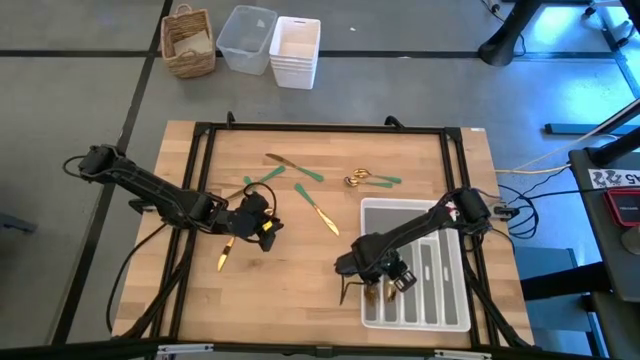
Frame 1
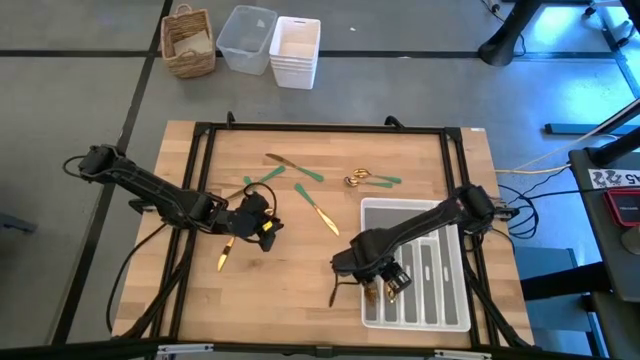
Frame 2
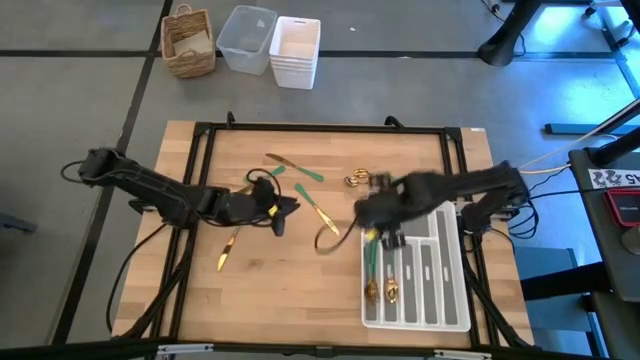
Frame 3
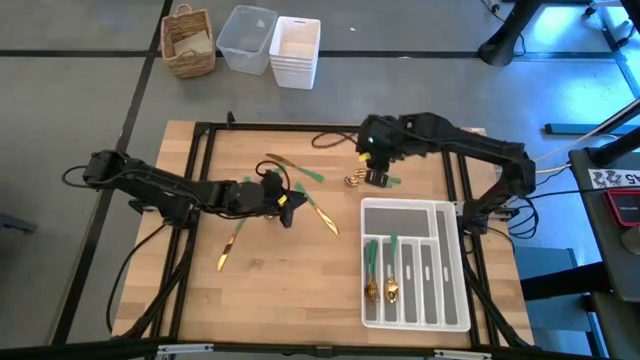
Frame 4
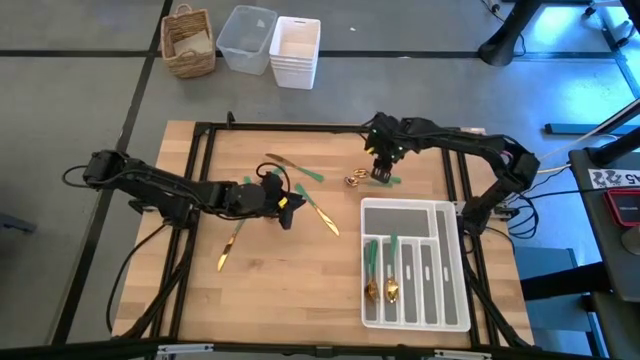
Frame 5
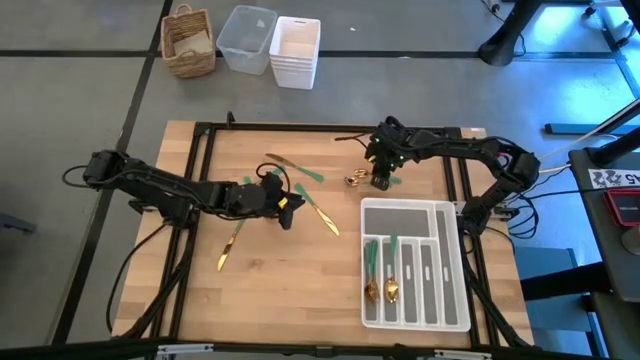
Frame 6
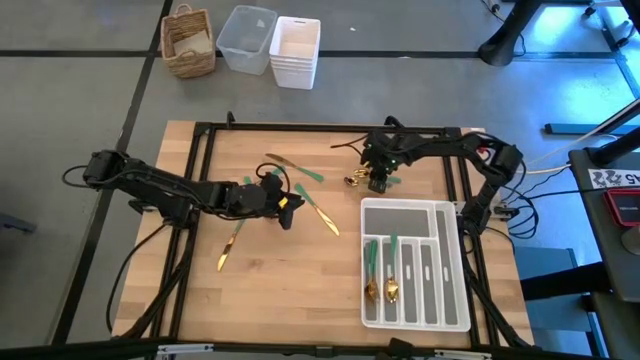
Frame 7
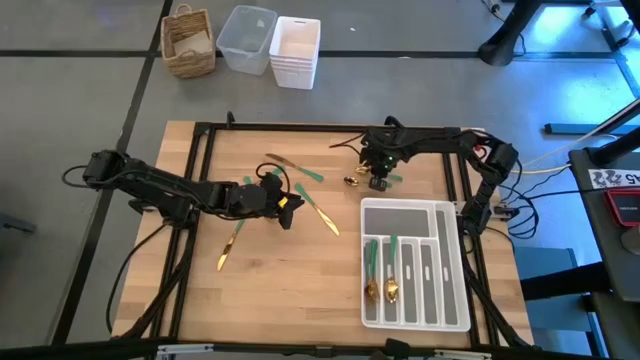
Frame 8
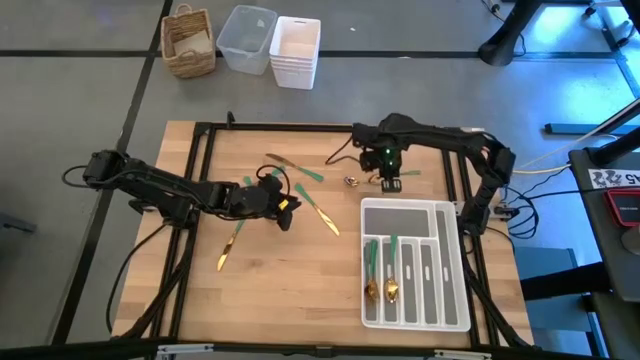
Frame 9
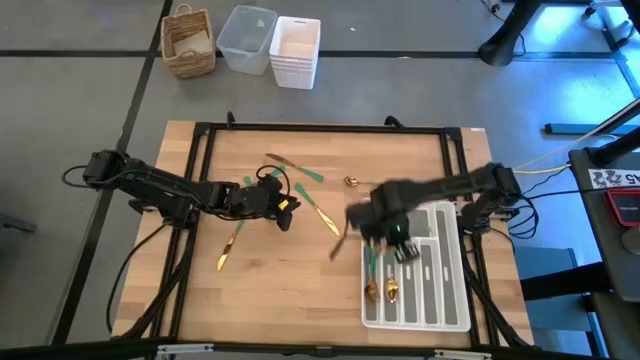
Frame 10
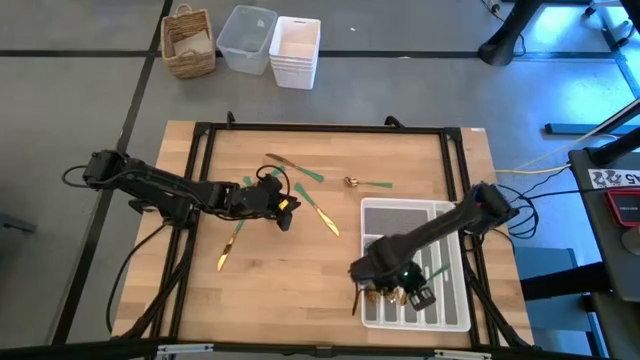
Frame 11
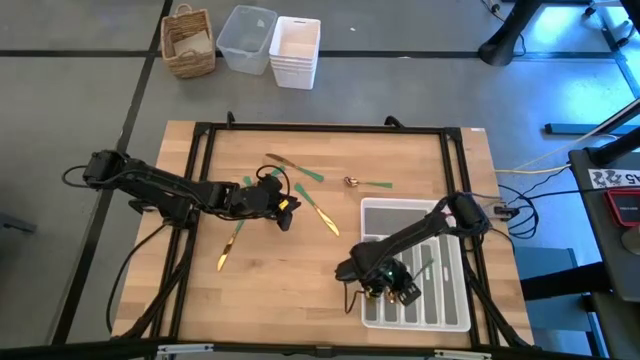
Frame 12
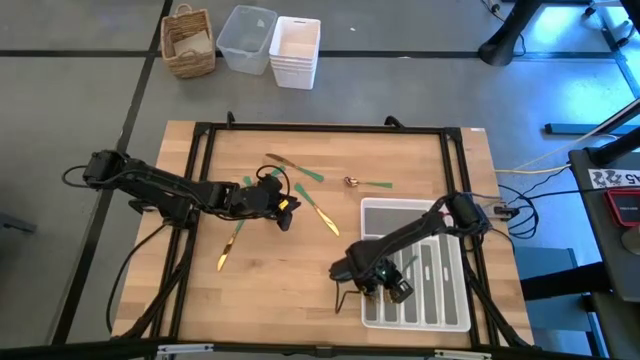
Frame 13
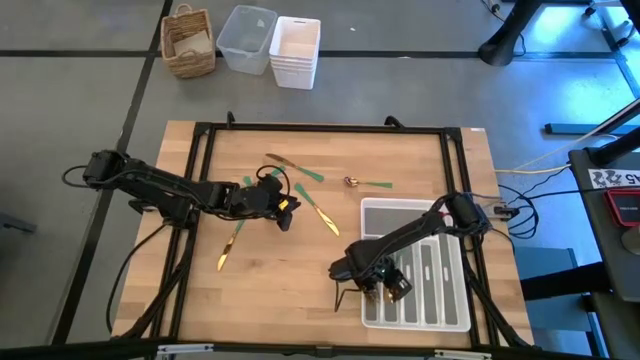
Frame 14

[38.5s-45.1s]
Task: Sort silverware
Put the green spoon in the white silverware tray

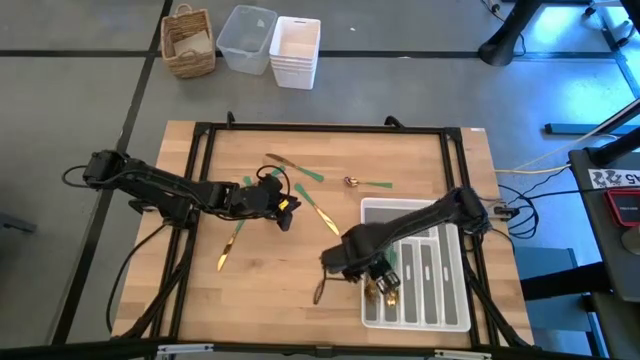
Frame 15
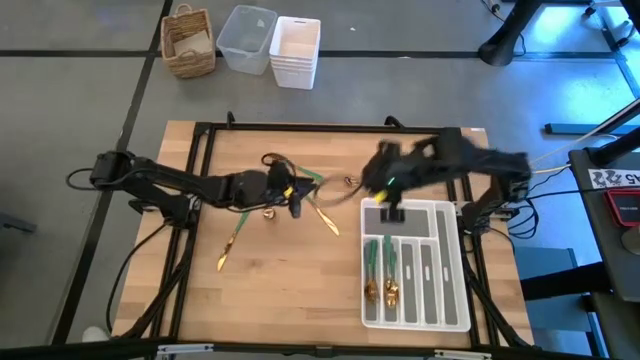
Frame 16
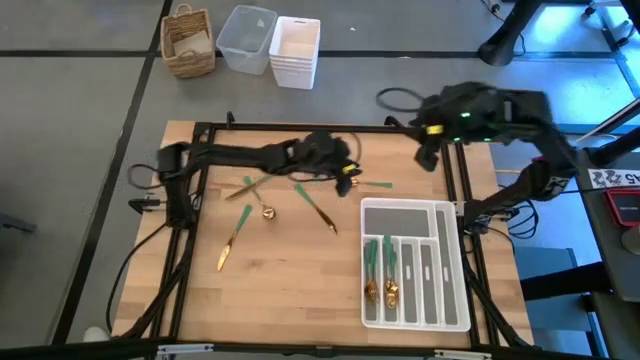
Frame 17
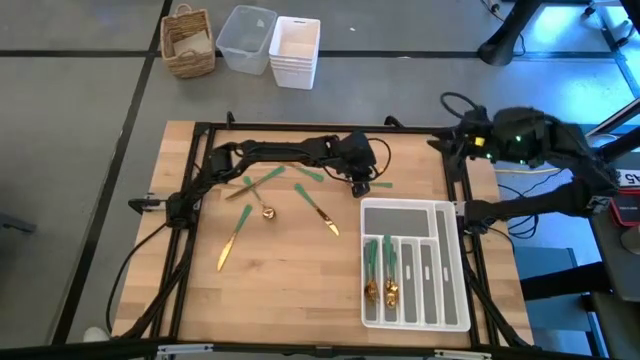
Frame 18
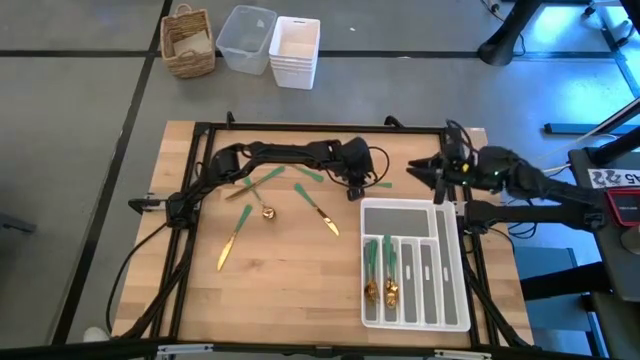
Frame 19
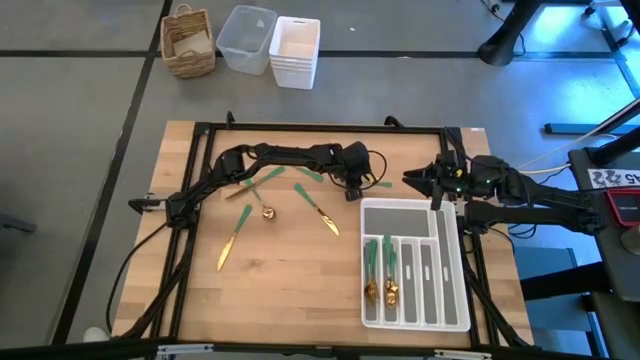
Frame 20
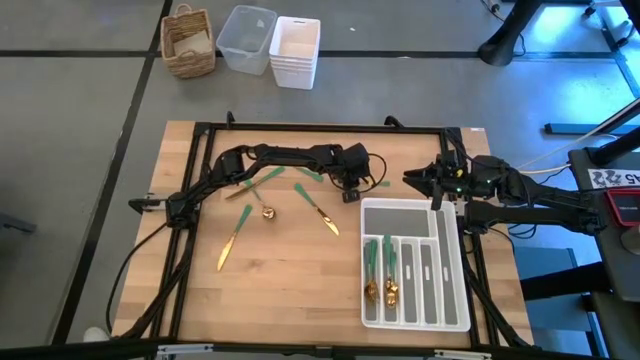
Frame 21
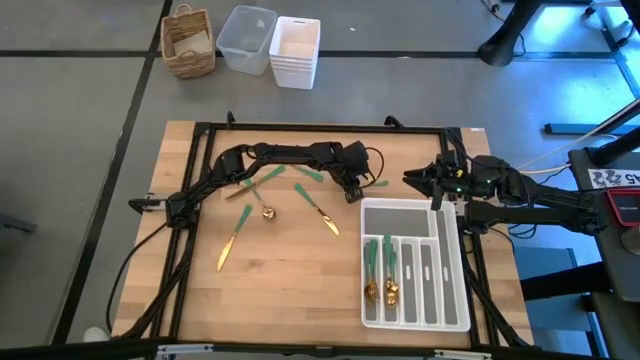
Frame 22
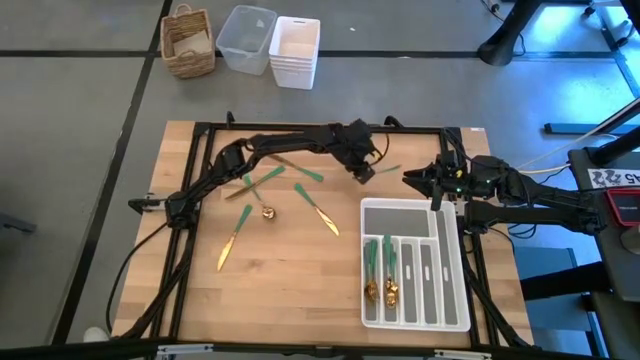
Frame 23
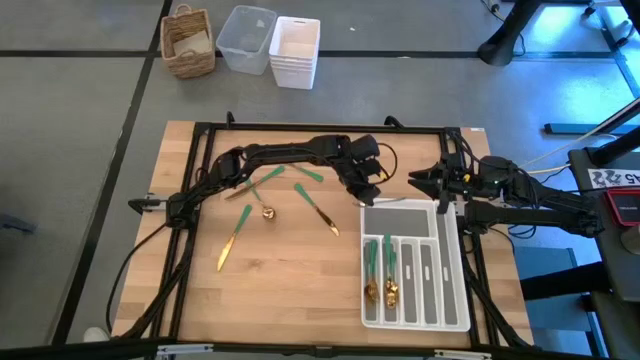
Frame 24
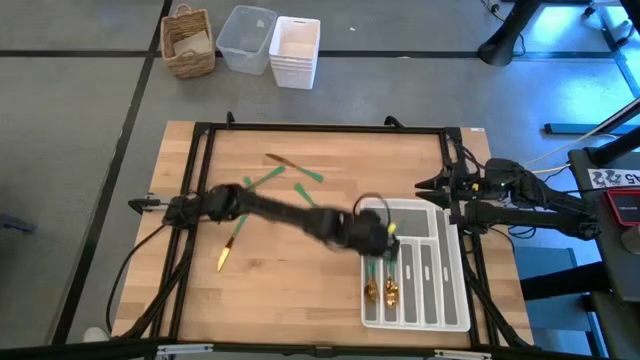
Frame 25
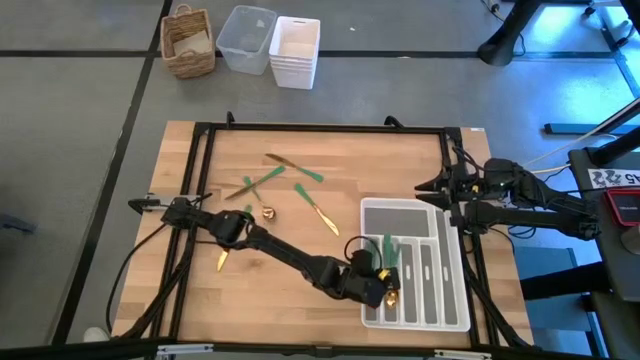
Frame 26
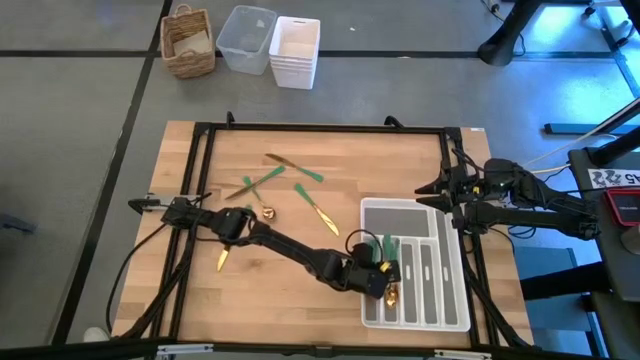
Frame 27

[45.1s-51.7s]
Put the green spoon in the white silverware tray

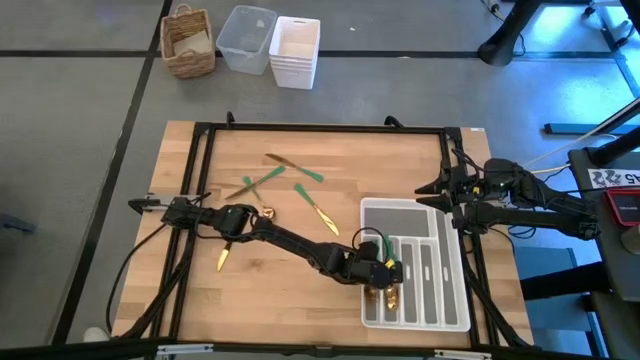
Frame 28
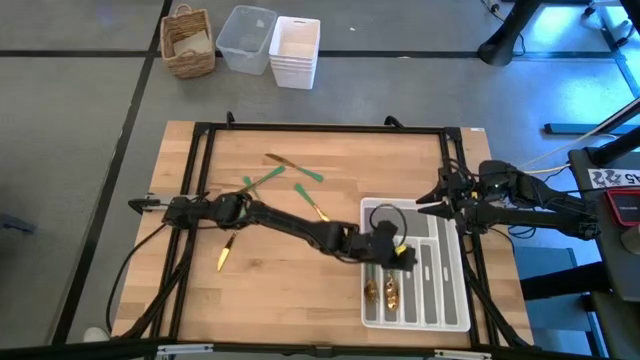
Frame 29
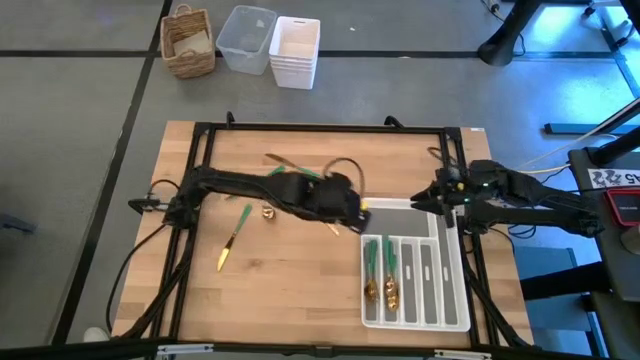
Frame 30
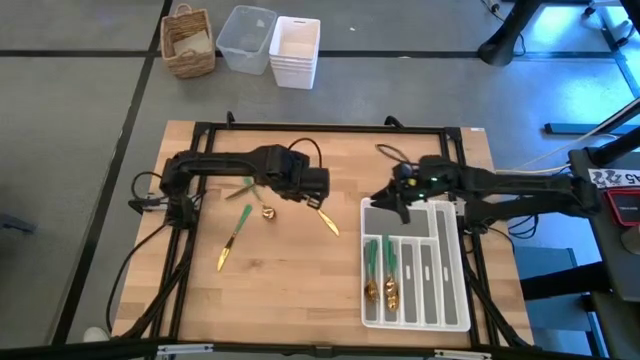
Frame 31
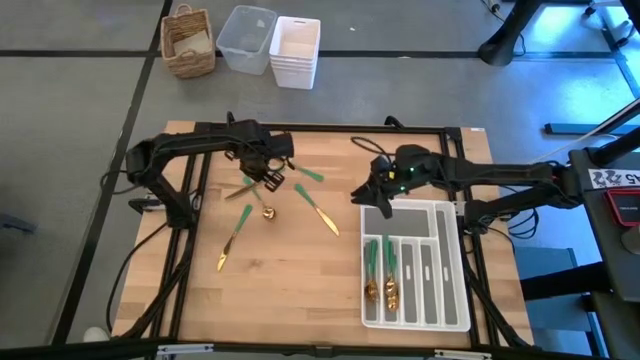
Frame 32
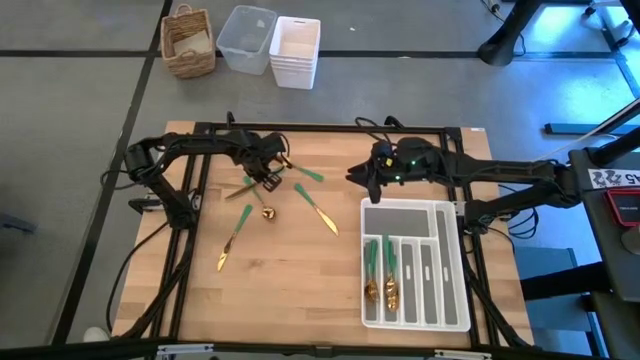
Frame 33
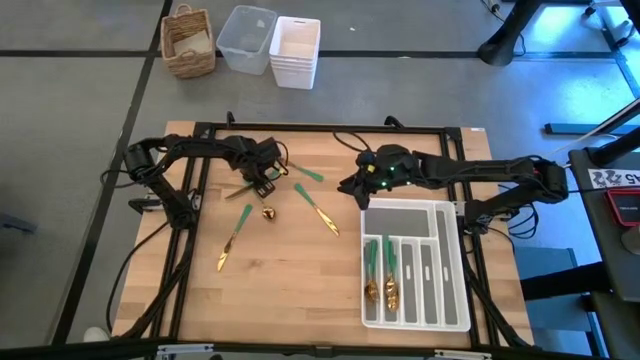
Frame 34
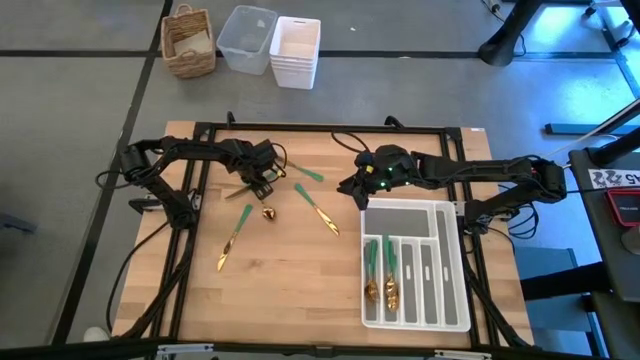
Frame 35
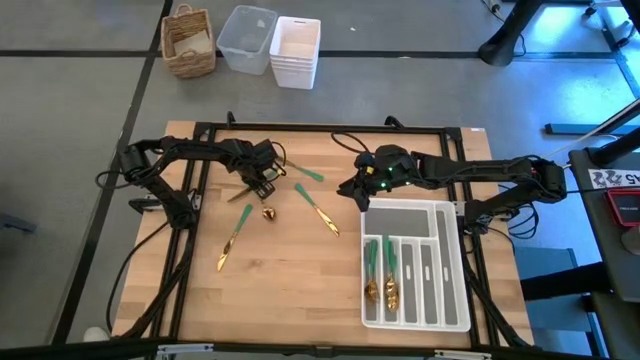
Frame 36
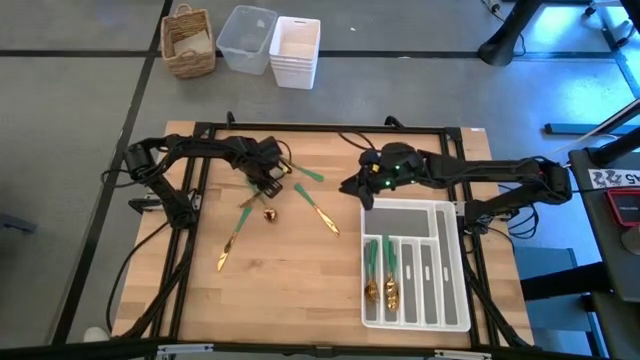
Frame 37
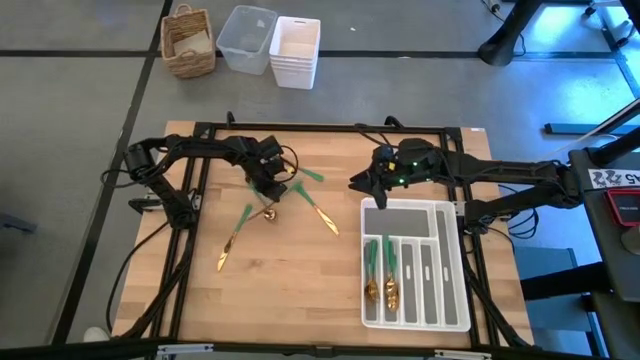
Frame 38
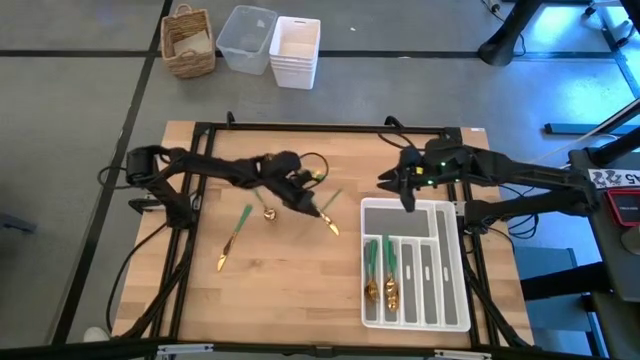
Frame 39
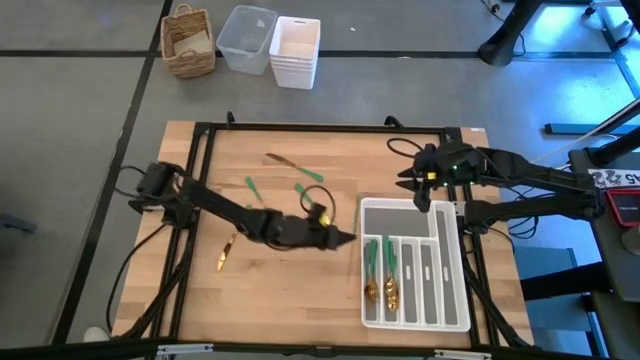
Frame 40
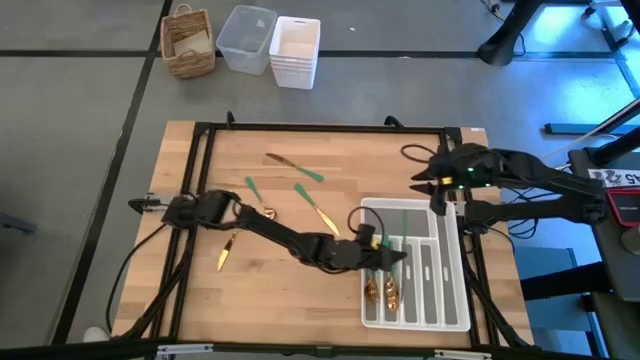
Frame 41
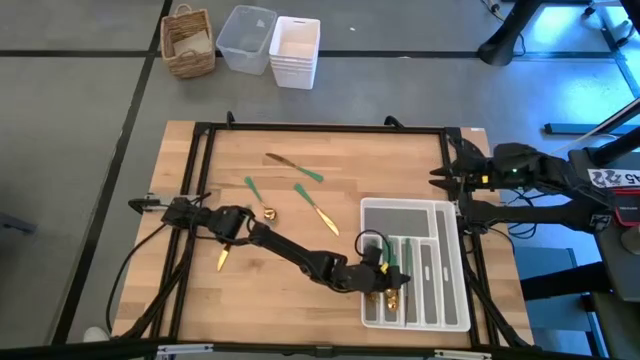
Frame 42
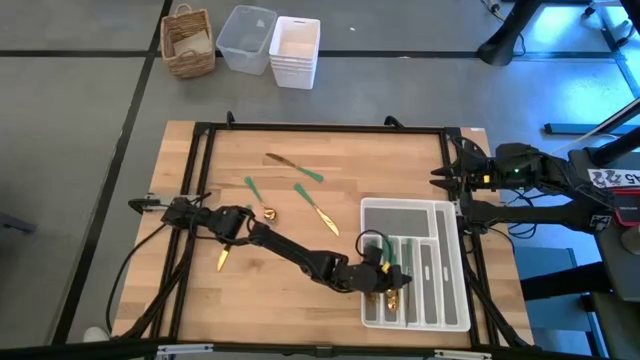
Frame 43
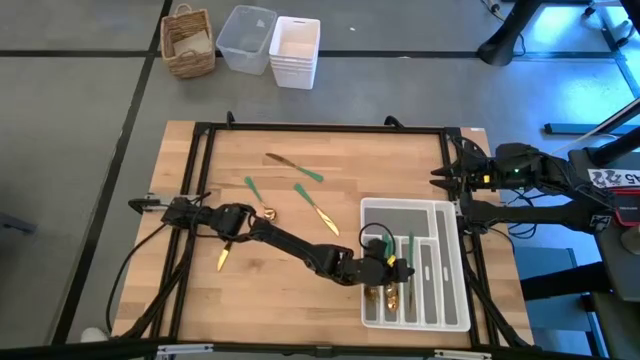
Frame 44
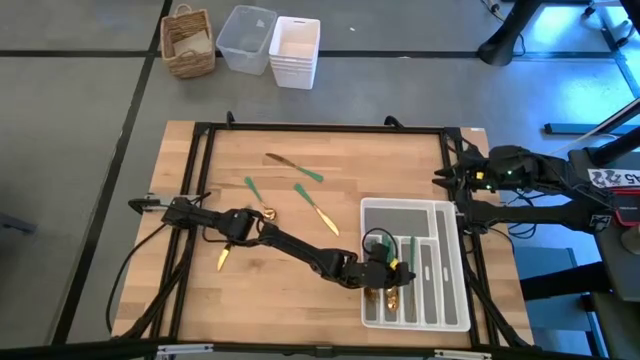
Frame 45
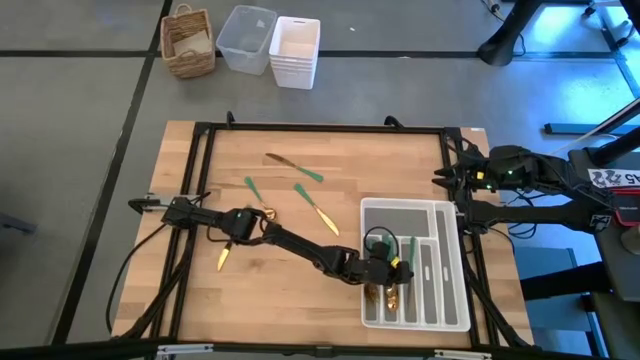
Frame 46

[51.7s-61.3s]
Put the green knife in the white silverware tray
